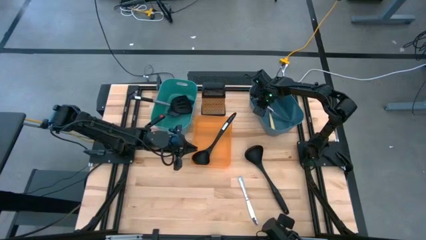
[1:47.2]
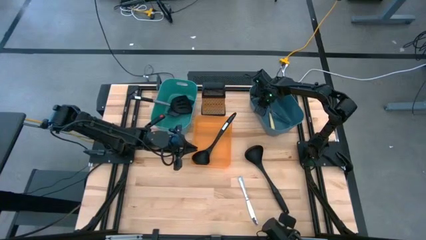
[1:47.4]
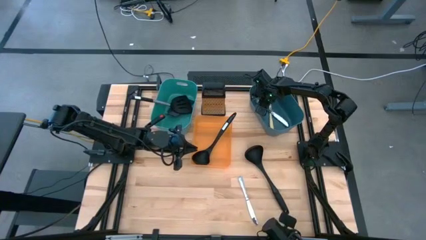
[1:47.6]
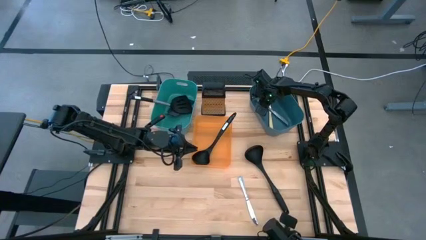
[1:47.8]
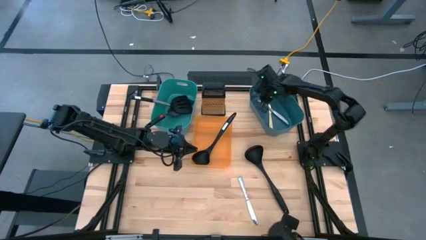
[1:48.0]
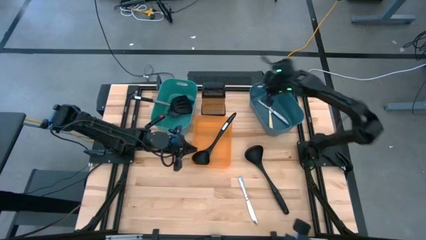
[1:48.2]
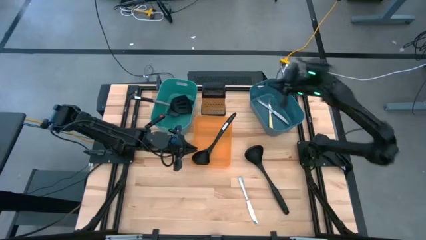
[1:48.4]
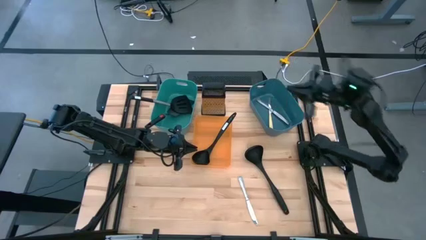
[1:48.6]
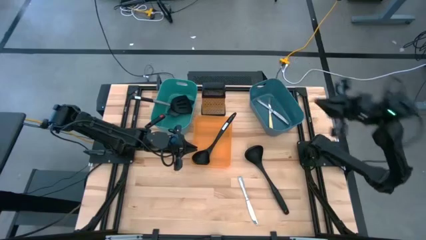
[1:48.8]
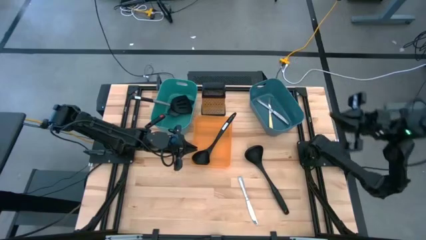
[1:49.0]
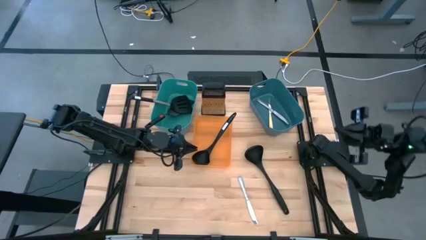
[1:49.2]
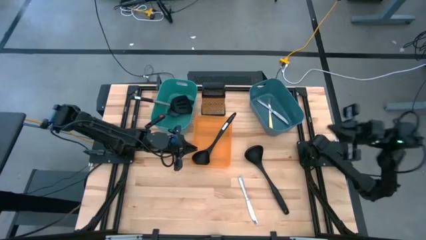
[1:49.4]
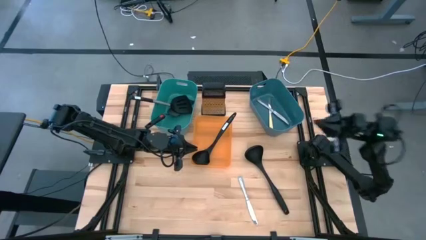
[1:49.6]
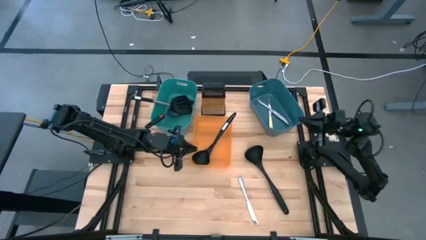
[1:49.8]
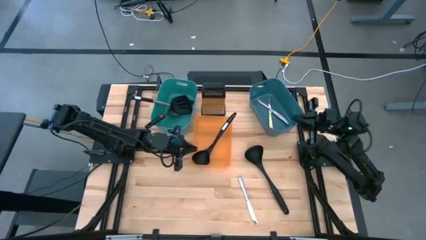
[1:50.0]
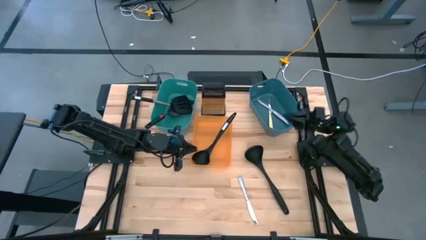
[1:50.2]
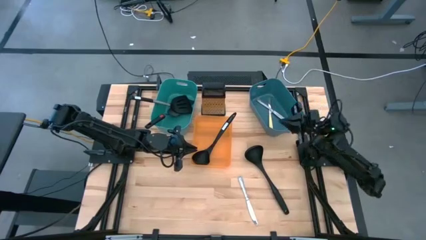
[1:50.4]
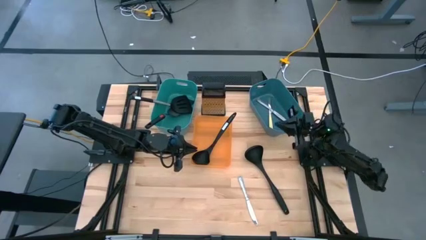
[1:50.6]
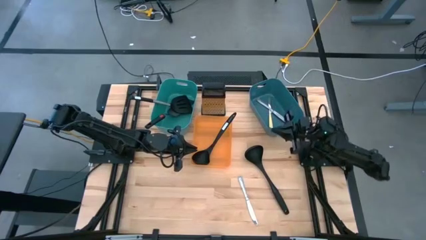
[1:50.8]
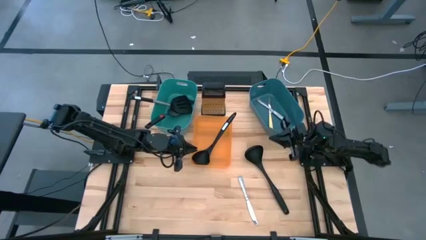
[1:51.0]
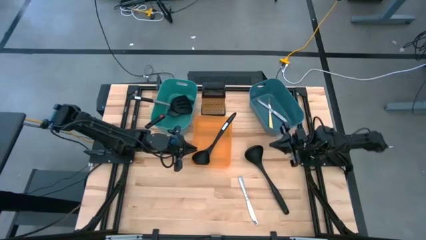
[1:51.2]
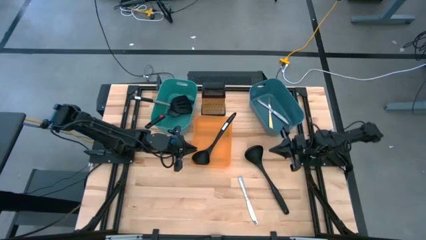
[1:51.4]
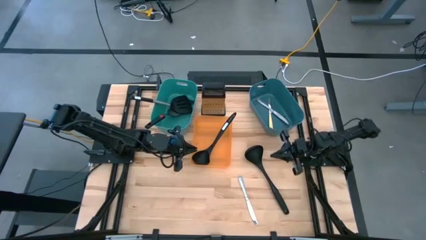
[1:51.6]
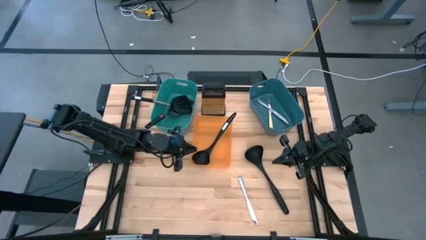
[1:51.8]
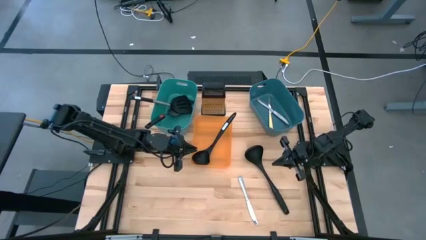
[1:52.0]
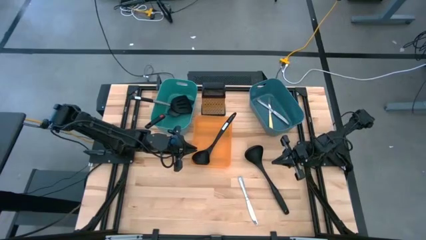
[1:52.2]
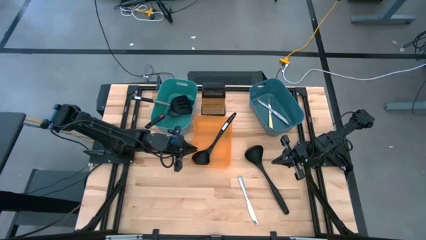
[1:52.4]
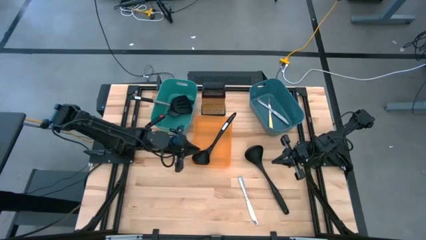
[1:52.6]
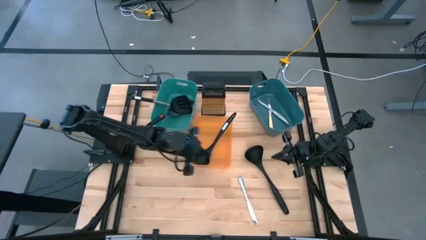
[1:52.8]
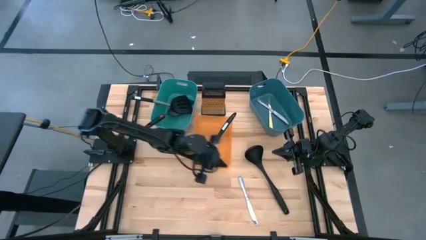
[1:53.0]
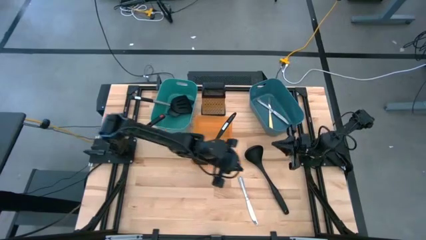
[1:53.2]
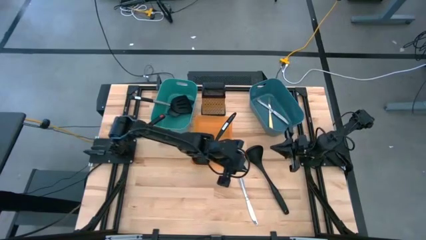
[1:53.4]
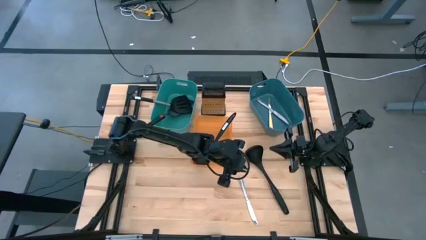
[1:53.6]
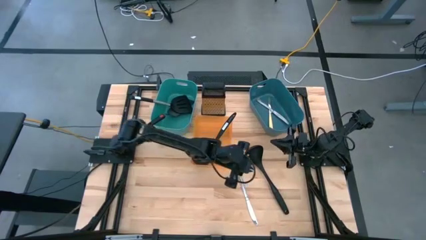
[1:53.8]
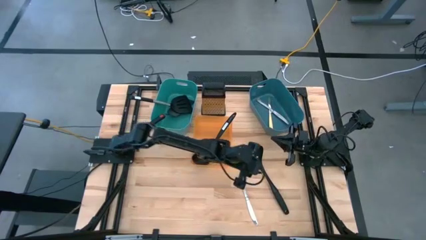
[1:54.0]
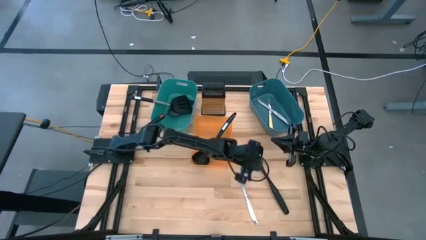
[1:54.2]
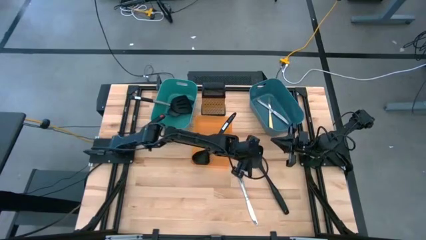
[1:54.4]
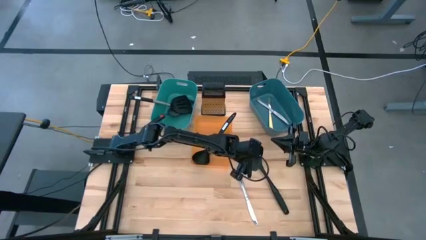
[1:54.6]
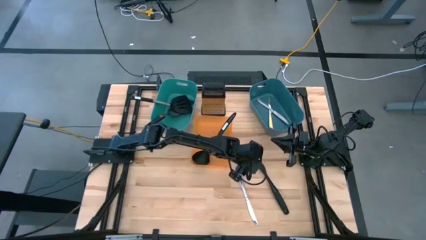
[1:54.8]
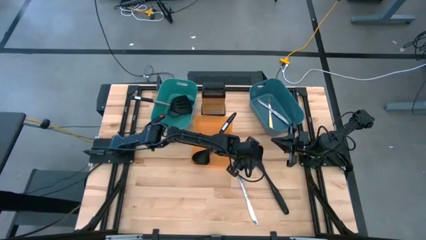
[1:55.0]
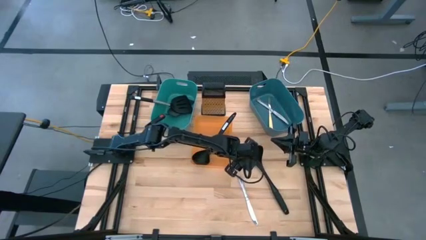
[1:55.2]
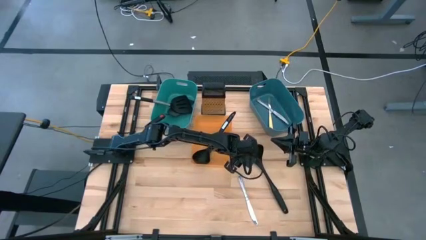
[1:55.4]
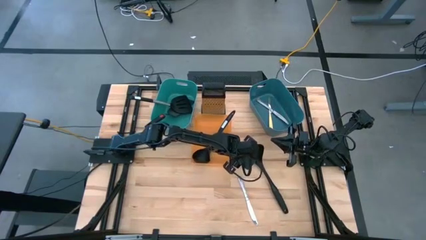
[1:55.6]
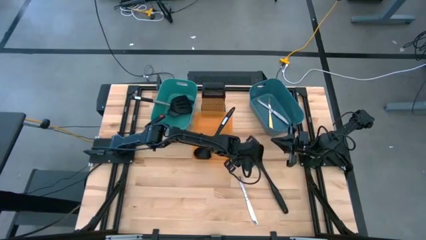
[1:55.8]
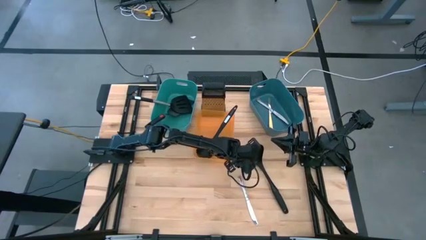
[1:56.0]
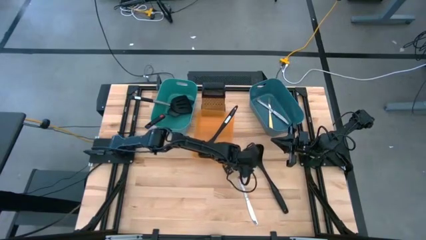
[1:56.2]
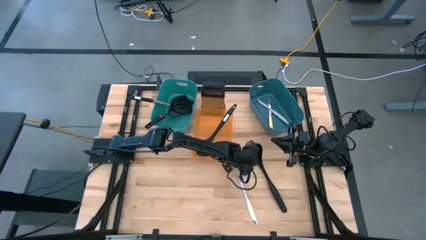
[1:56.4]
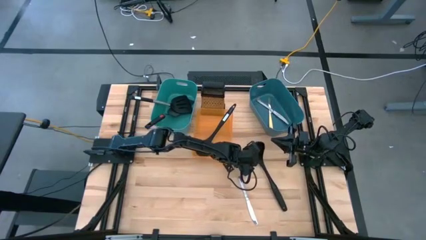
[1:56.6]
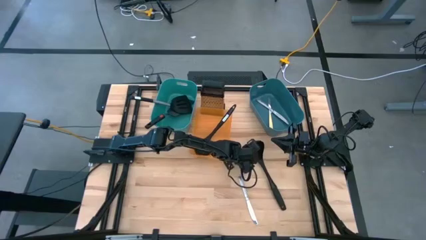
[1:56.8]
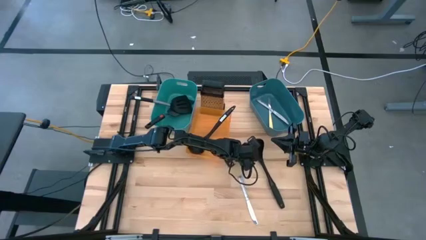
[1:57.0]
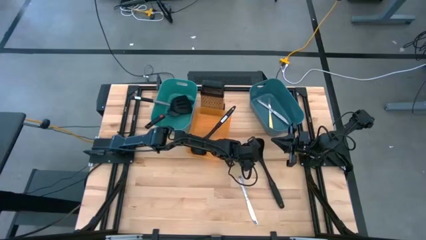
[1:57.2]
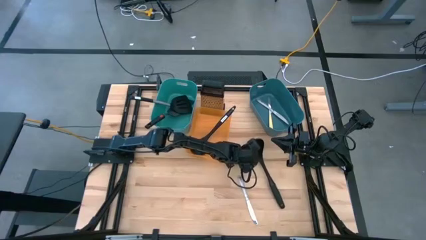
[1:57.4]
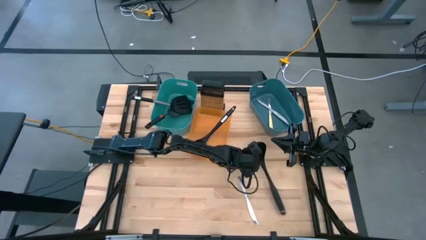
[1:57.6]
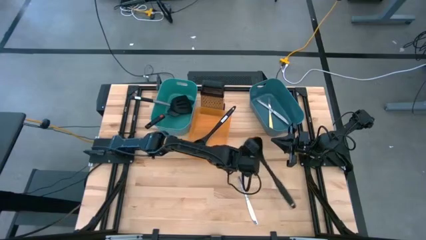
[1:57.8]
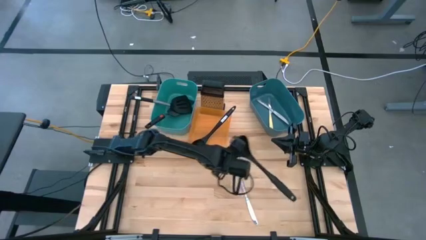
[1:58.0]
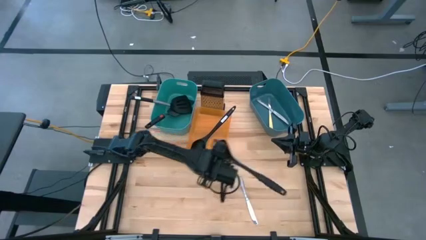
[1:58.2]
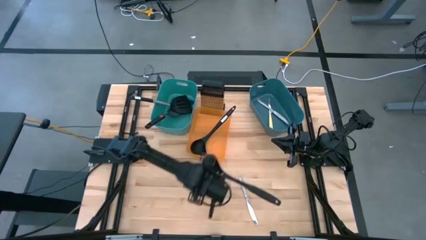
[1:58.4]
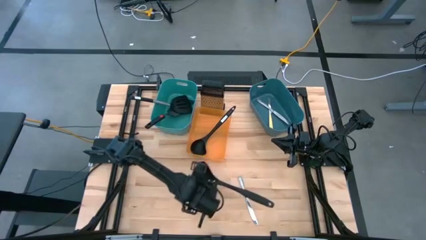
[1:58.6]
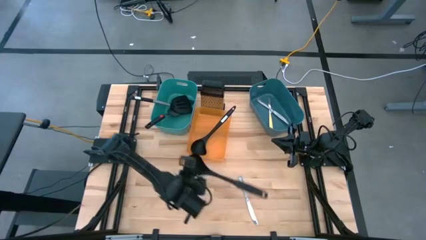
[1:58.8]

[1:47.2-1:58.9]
Task: Pick & Place Kitchen Items
Put the black ladle into the orange bin

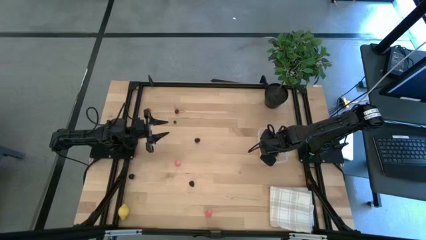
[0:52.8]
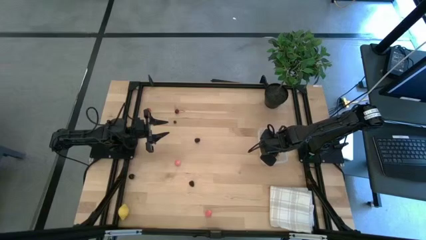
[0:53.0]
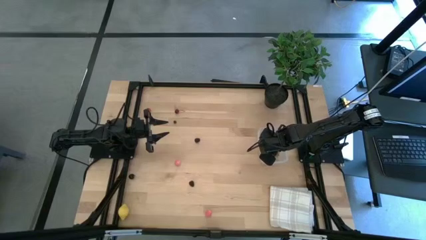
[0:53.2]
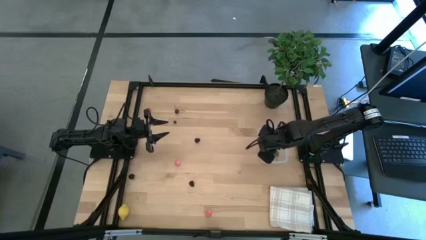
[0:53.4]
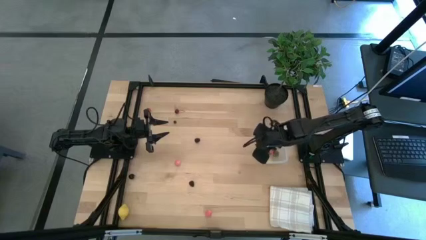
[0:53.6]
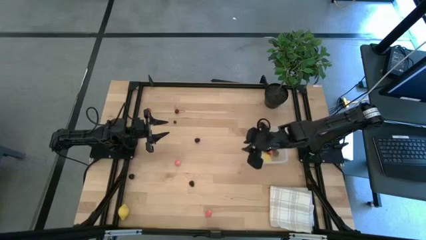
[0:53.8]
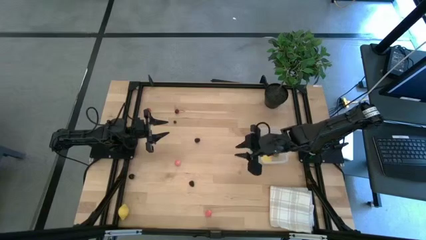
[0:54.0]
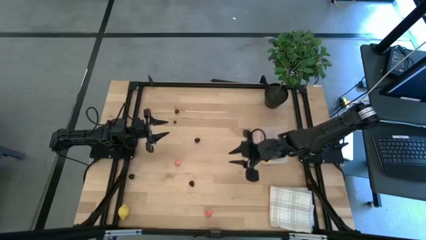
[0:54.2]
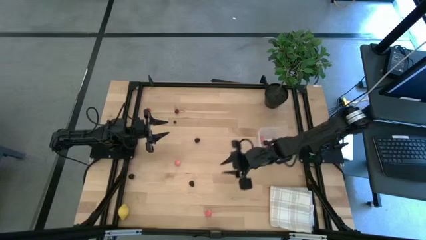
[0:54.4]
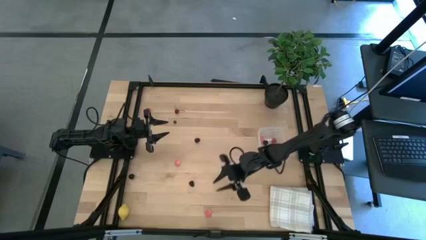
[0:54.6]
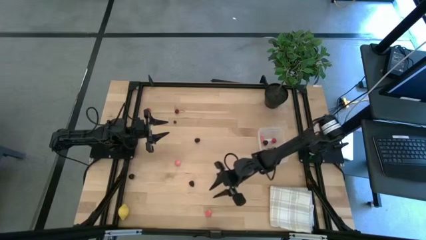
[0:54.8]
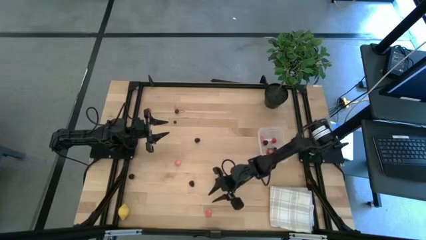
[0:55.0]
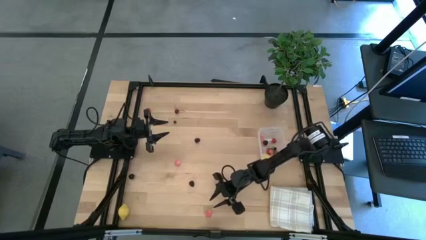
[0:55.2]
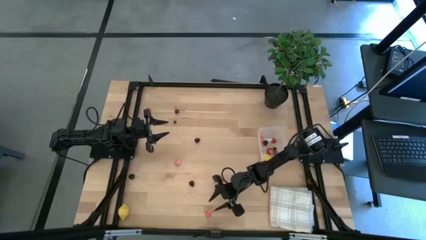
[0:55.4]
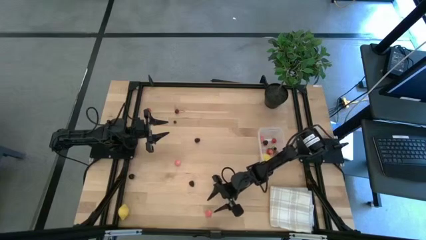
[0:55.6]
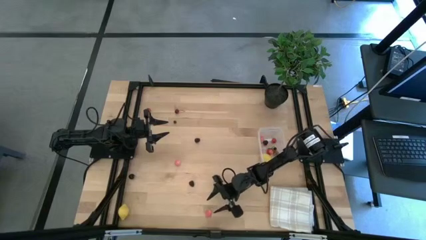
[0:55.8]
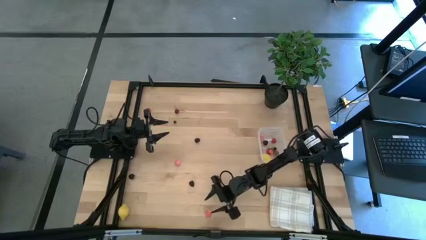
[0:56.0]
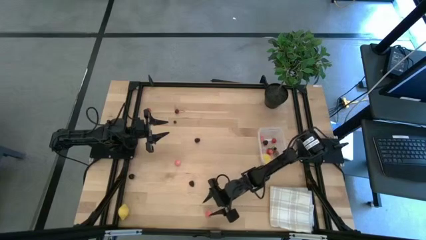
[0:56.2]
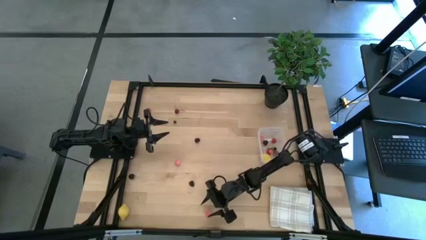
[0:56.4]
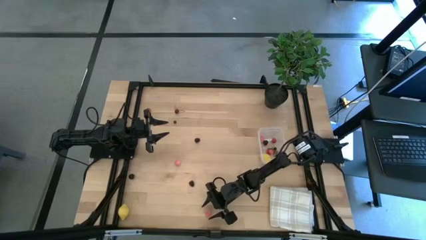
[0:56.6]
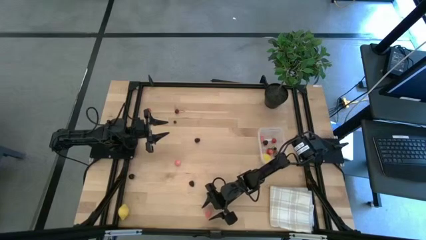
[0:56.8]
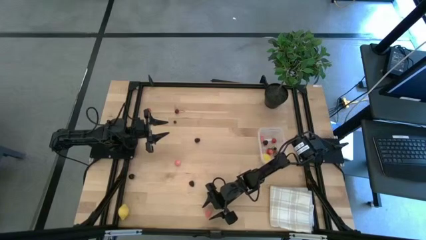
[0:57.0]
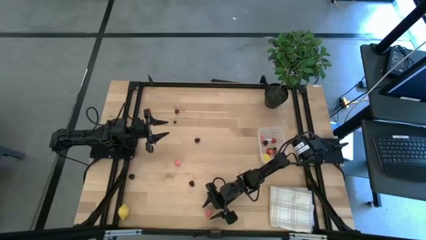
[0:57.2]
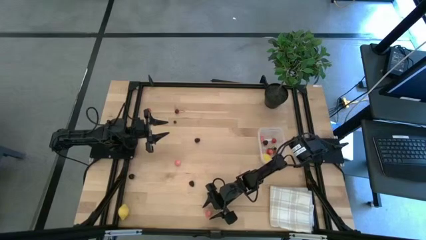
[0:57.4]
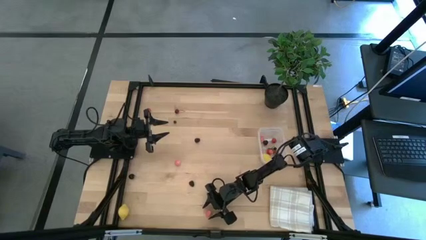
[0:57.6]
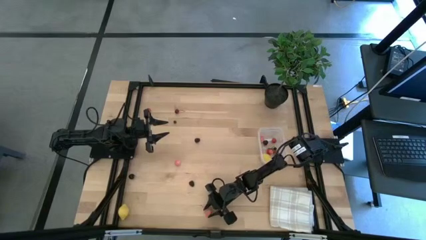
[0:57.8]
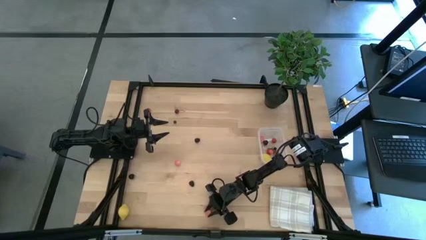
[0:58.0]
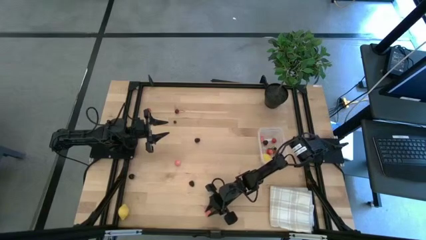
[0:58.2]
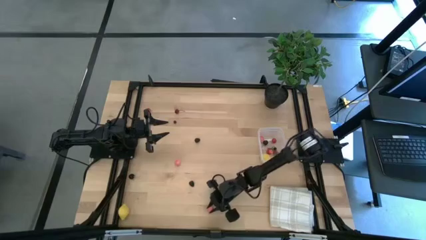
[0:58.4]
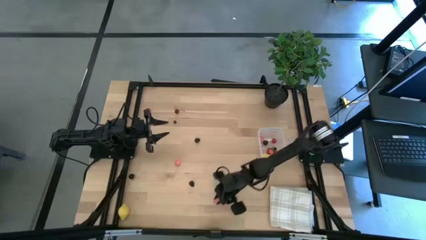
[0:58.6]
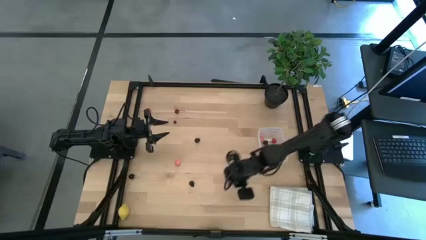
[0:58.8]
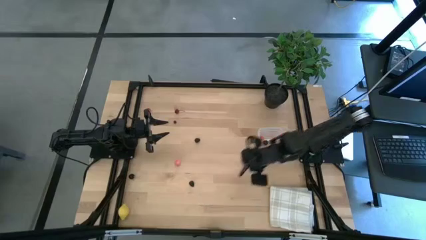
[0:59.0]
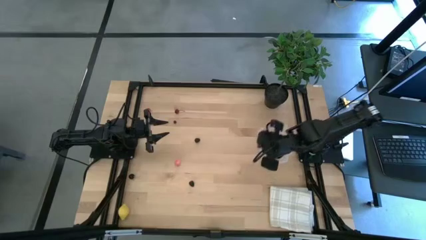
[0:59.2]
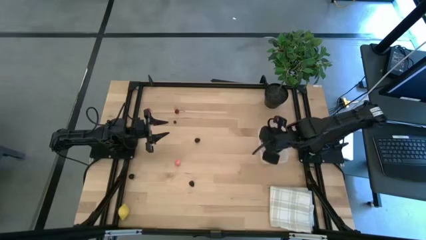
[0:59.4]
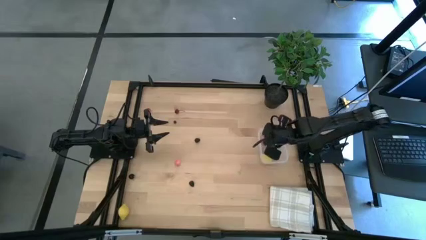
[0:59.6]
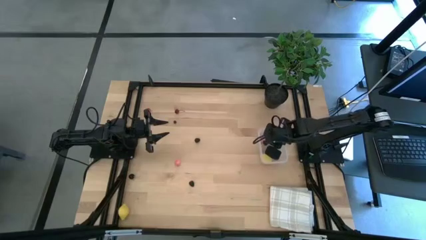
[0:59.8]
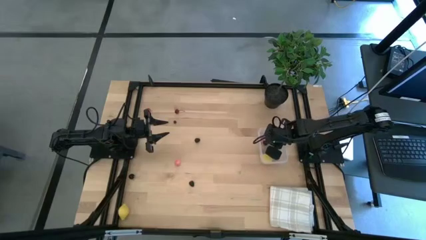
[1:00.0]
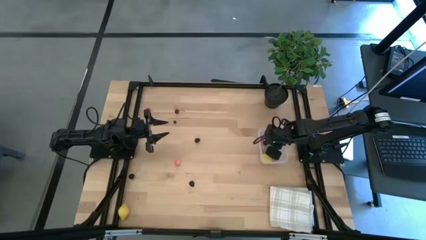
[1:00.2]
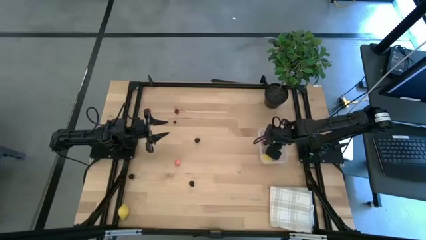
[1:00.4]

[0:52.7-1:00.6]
Task: Pick and placing Produce into tupperware
Put the bottom peach into the transparent bin
